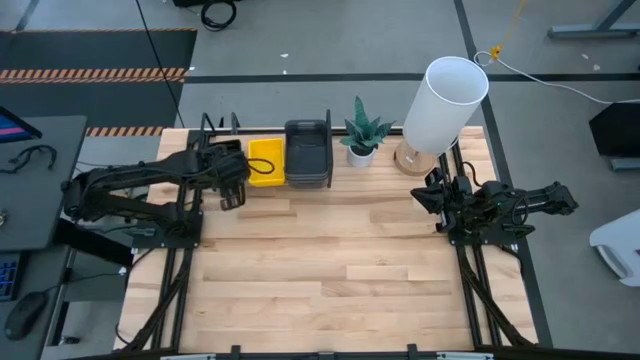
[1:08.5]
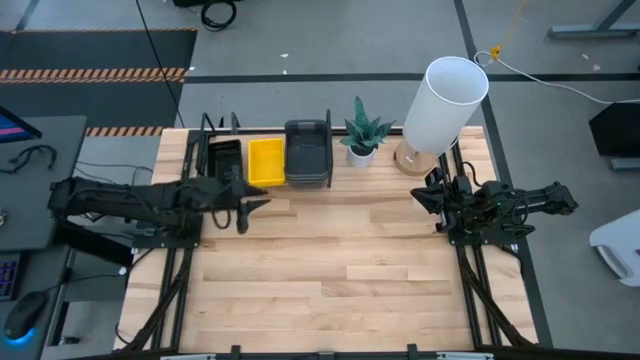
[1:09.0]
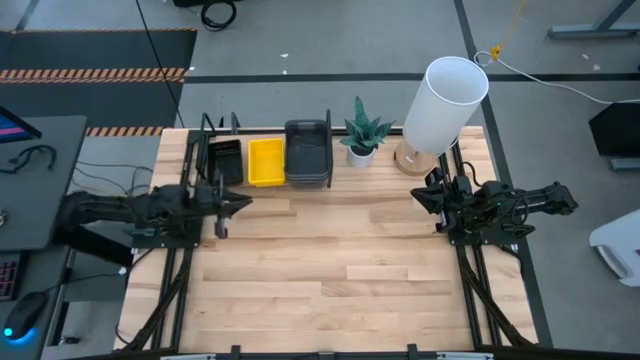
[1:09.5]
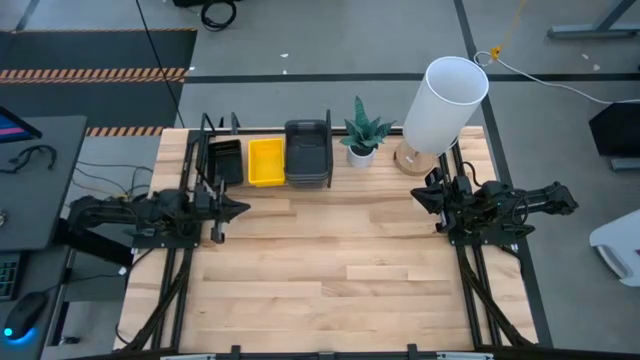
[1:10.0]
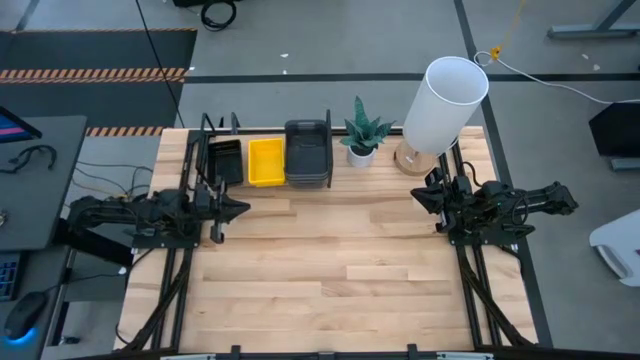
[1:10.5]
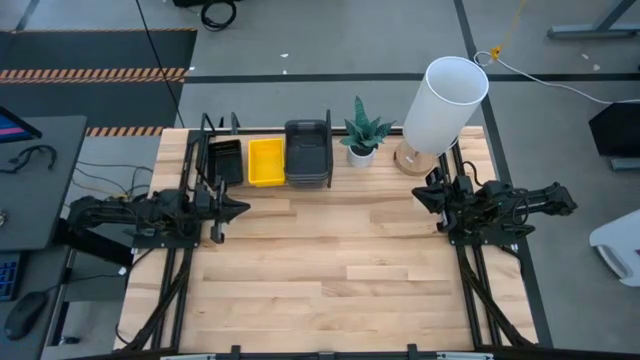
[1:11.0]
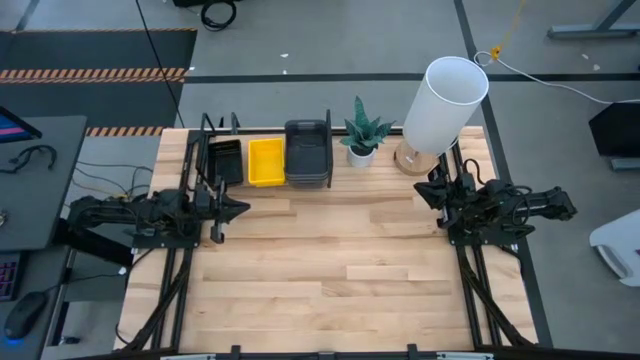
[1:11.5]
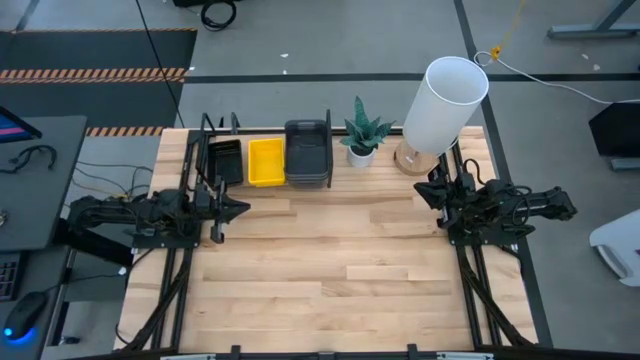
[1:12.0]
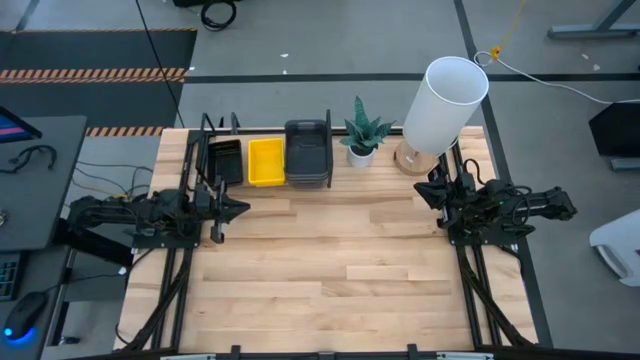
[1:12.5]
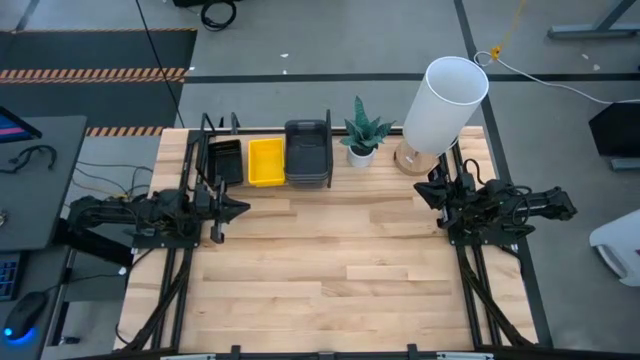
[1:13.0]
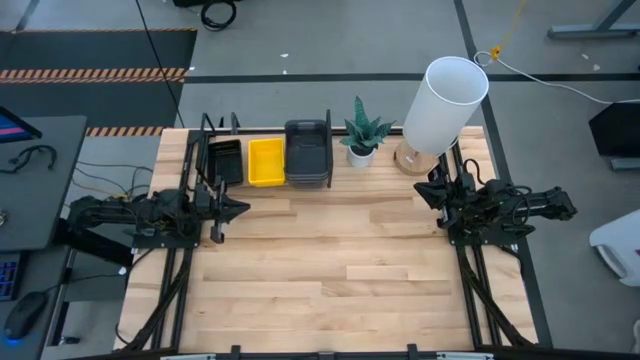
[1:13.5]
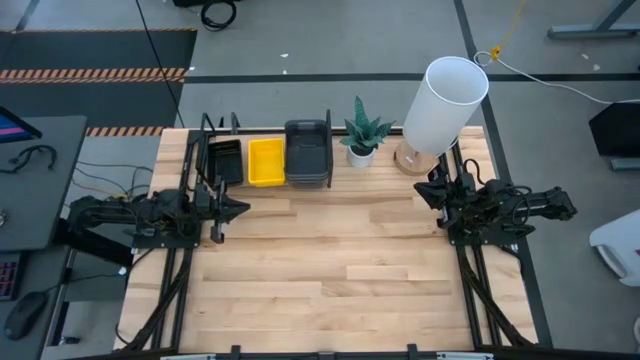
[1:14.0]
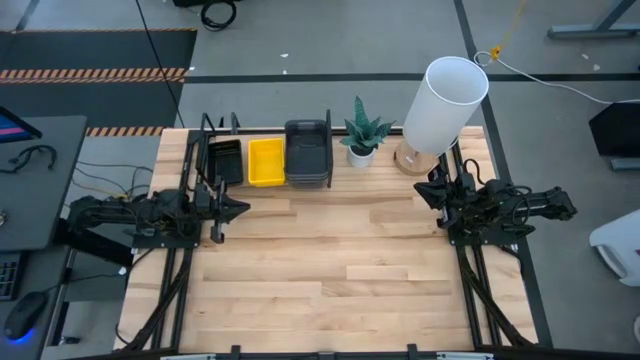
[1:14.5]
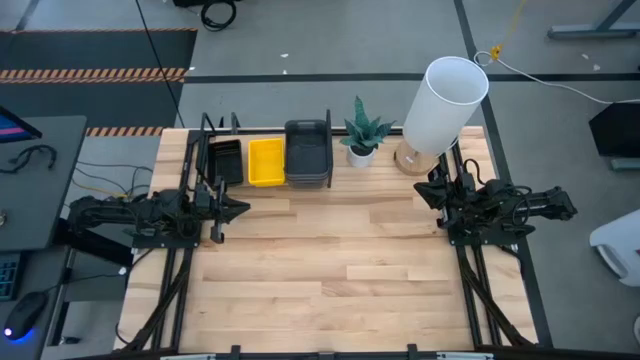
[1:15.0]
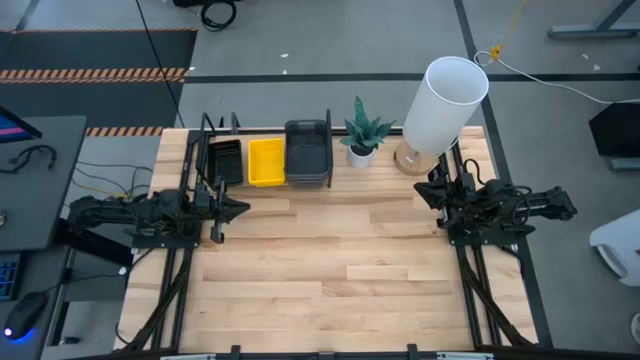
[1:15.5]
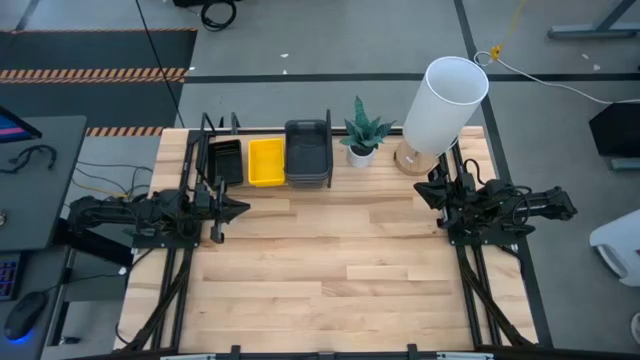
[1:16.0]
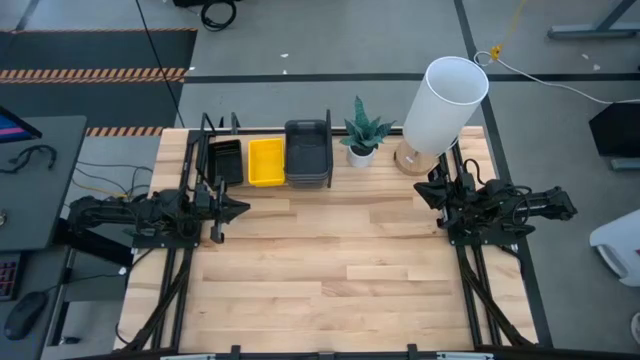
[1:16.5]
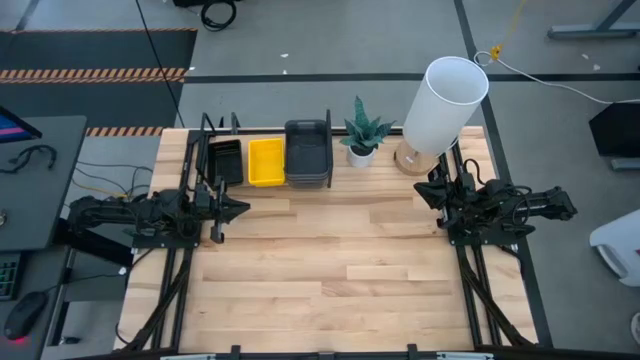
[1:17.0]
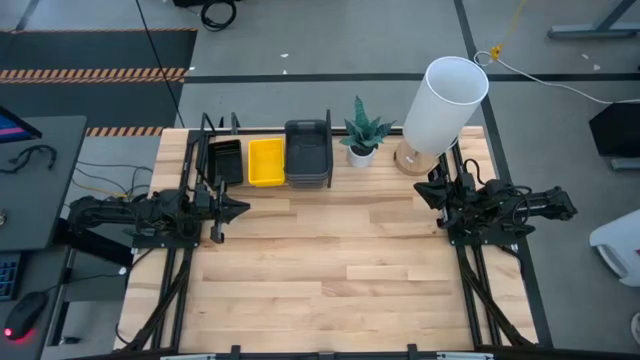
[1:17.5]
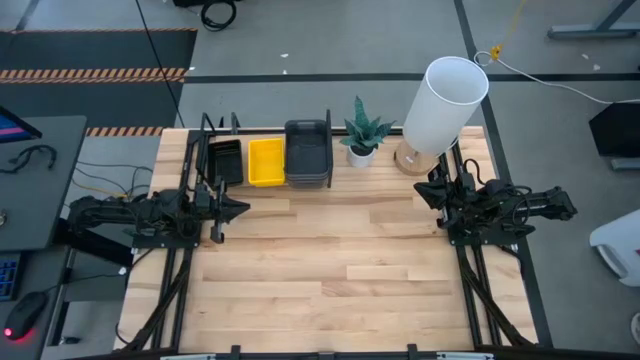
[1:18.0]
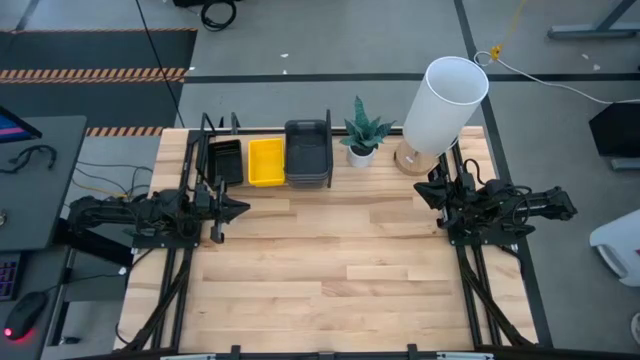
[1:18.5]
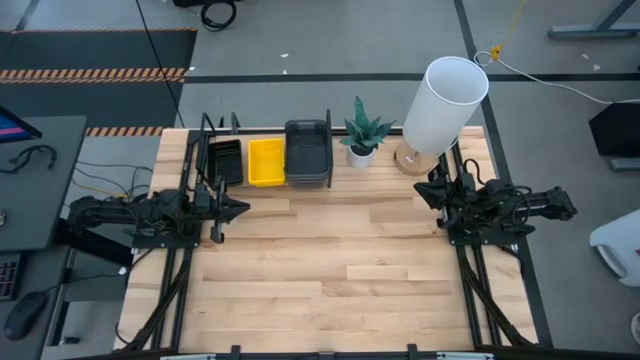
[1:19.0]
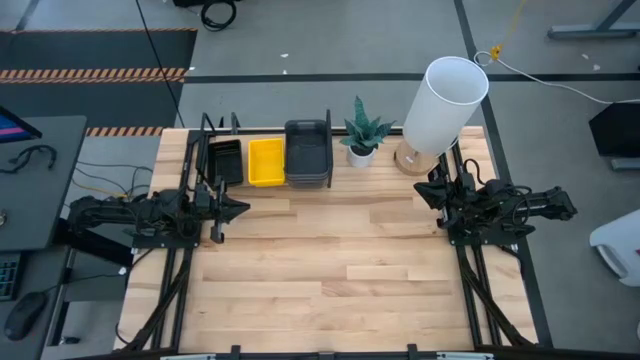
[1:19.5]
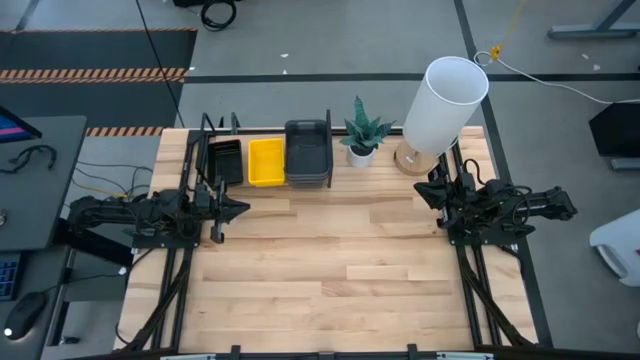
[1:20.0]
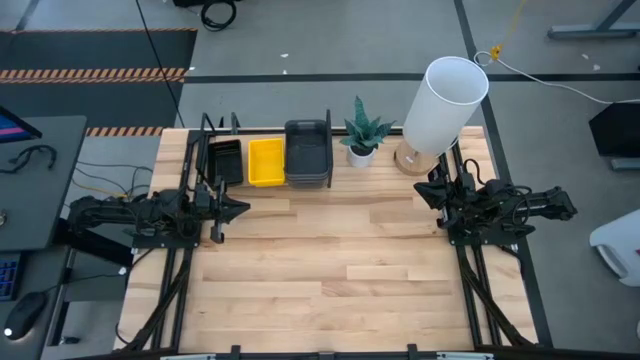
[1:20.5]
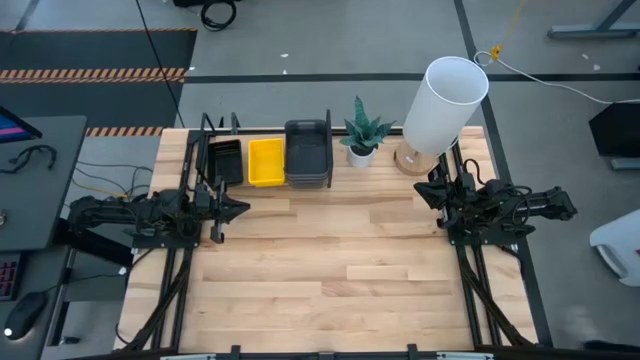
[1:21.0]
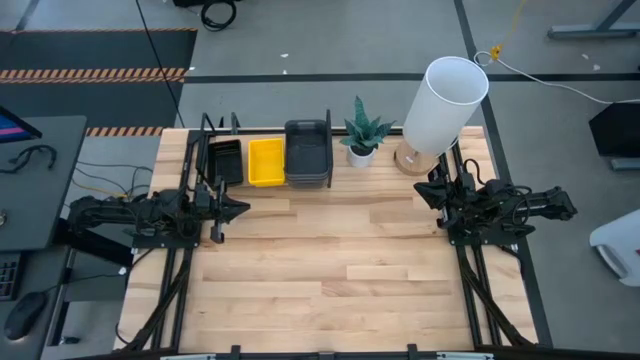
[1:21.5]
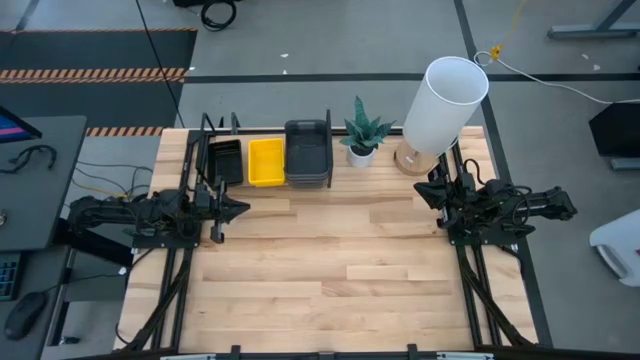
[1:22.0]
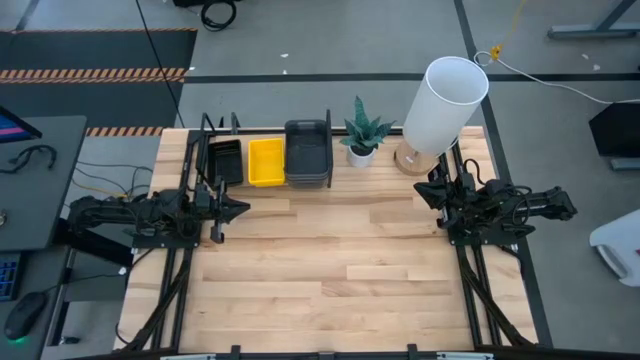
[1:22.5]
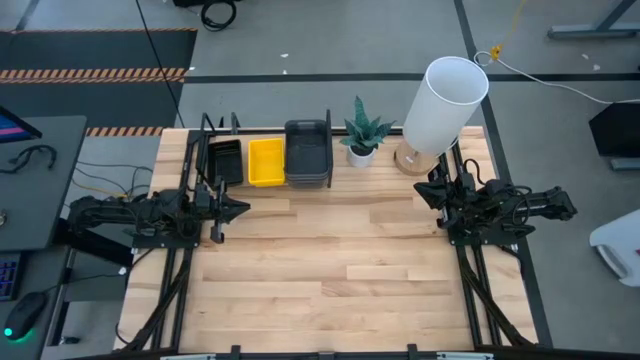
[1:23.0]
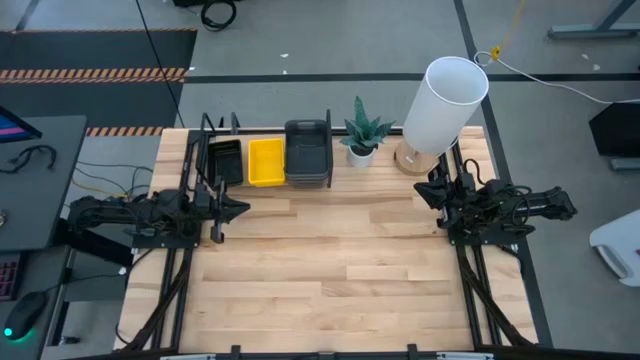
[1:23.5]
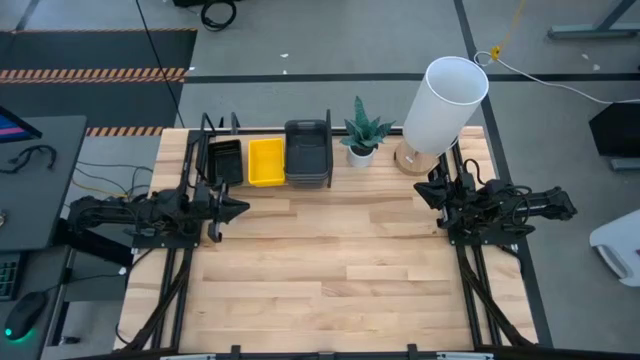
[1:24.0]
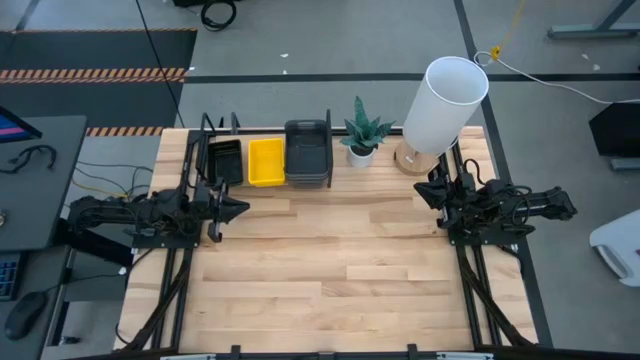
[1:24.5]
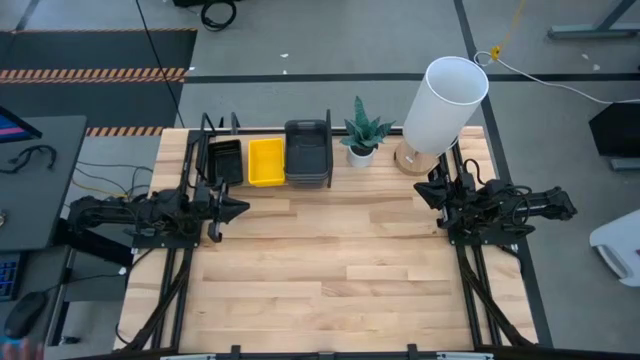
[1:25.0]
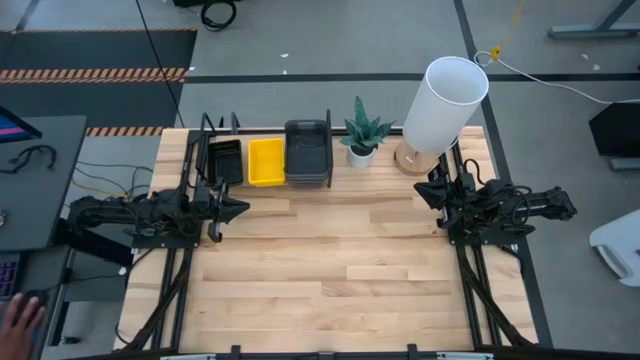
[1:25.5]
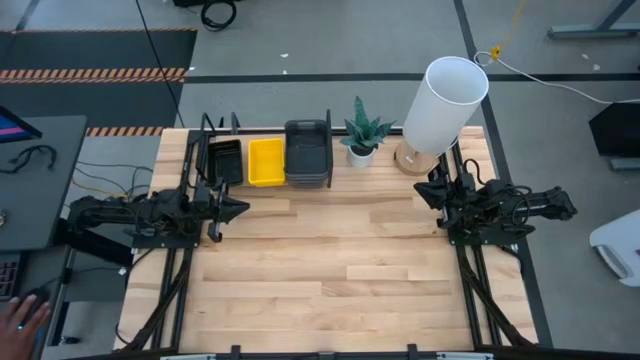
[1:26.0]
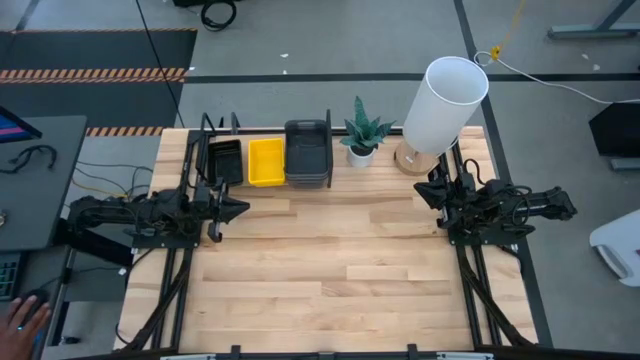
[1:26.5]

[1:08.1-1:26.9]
Task: Stack baskets on shelf by color
Return to Home Position

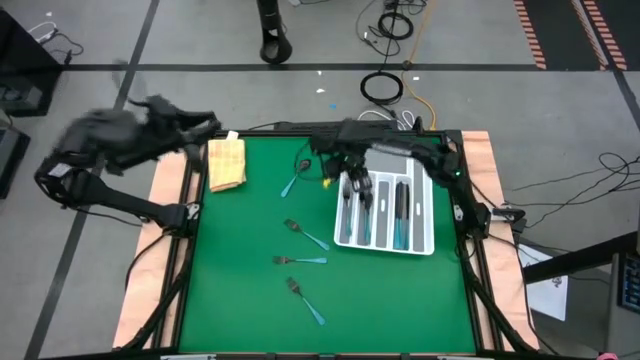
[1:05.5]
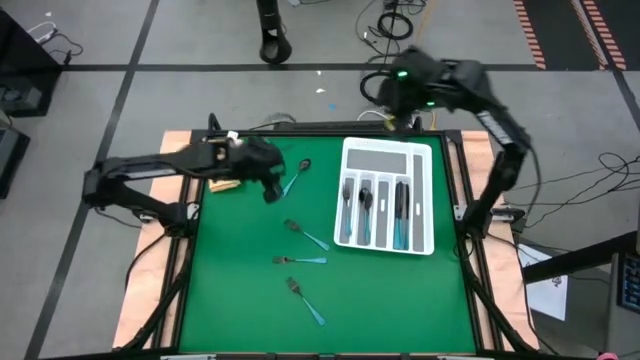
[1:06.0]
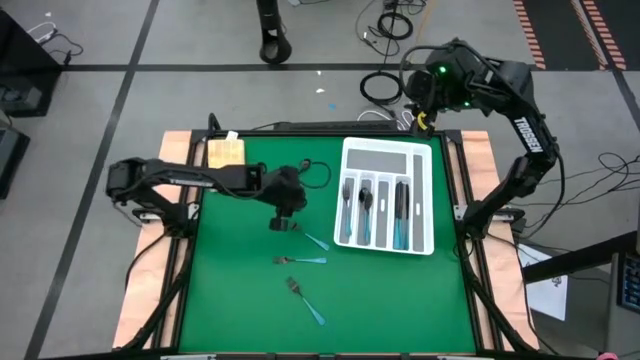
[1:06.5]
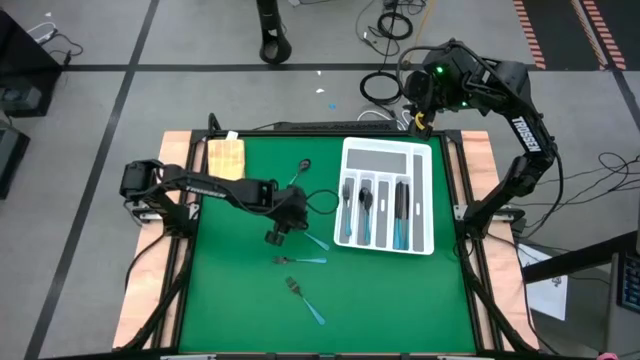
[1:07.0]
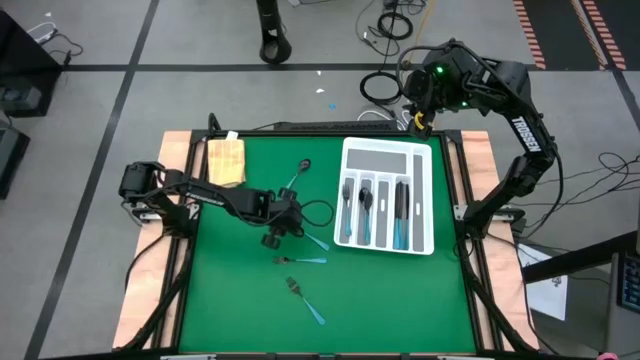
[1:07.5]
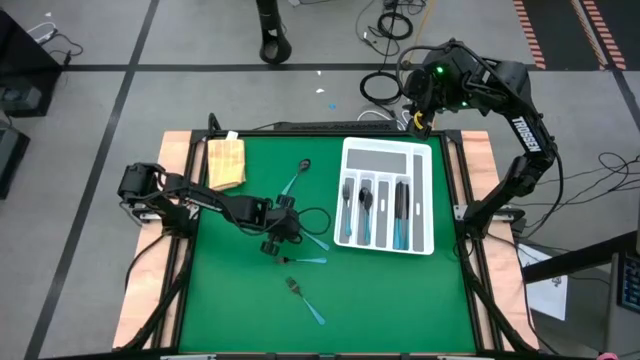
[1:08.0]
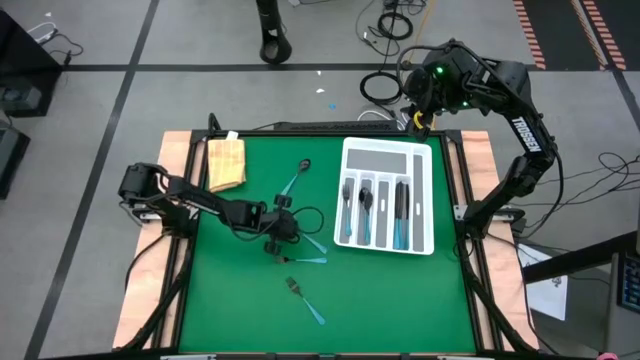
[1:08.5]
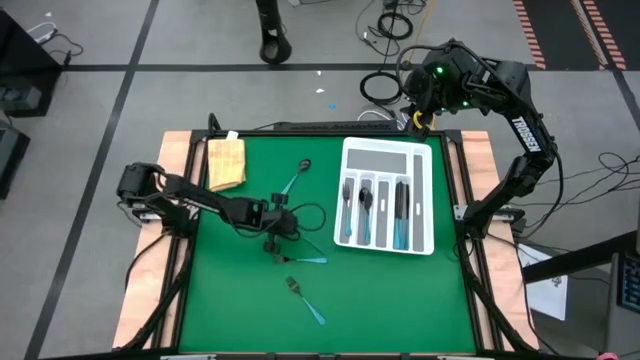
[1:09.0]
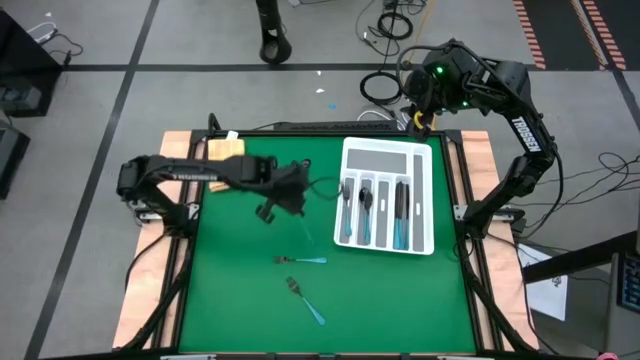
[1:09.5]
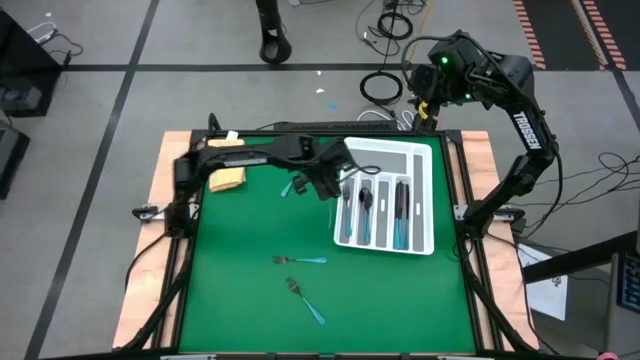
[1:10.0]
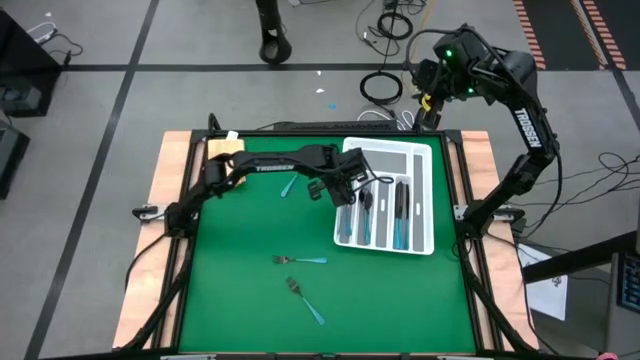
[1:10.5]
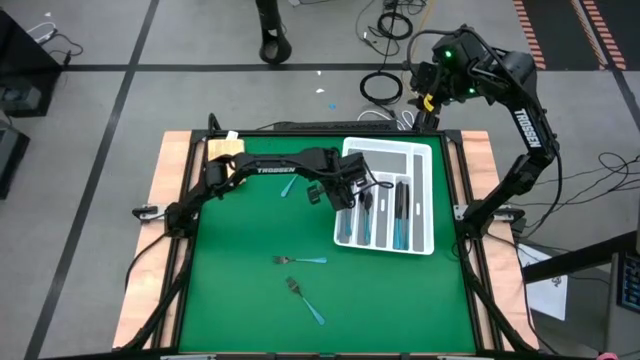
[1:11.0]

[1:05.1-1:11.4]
Task: Sort silverware
Put the blue fork into the silverware tray with the other blue fork
